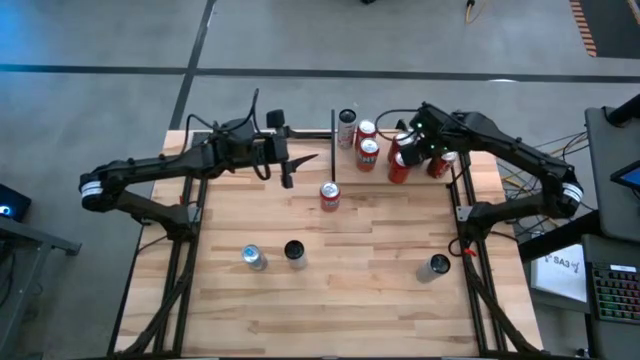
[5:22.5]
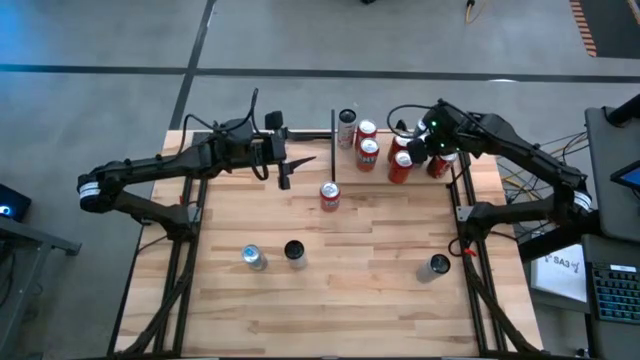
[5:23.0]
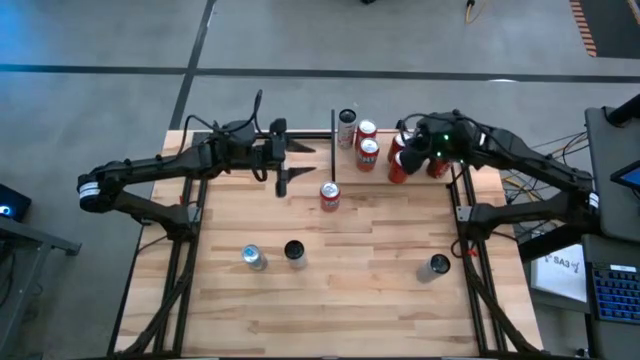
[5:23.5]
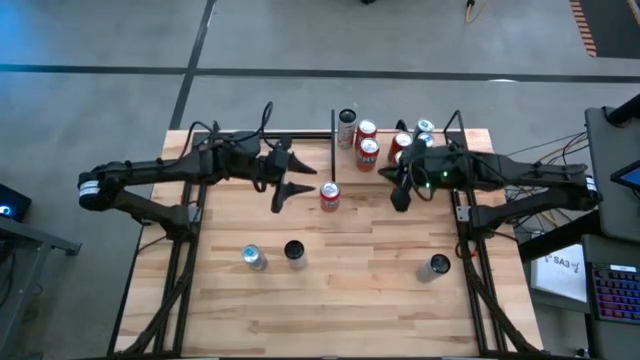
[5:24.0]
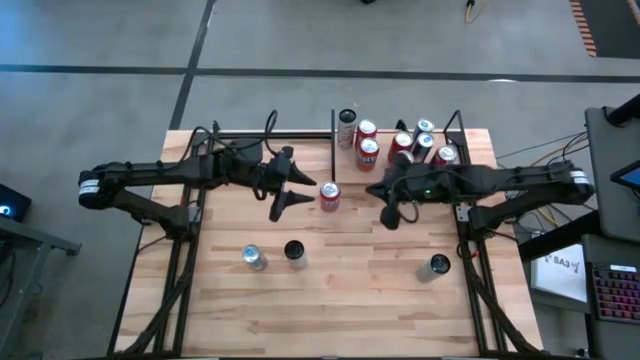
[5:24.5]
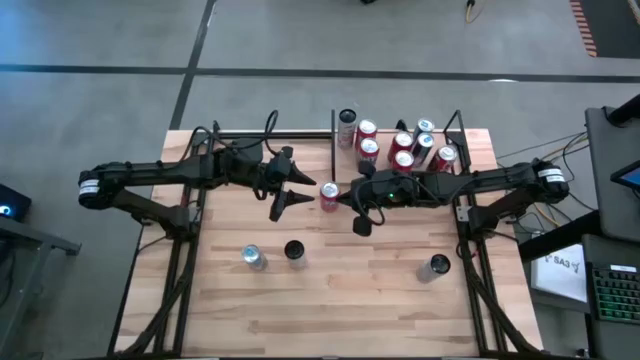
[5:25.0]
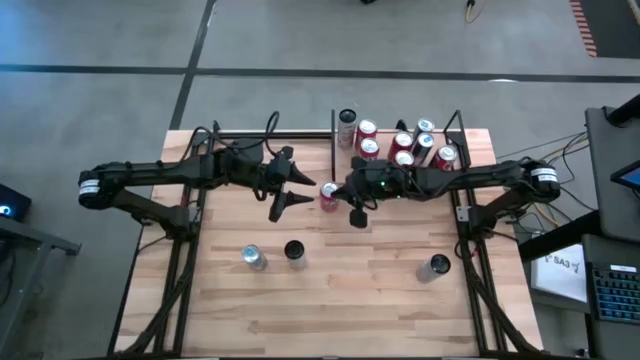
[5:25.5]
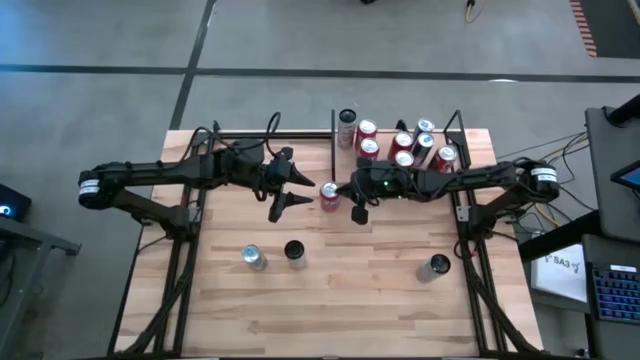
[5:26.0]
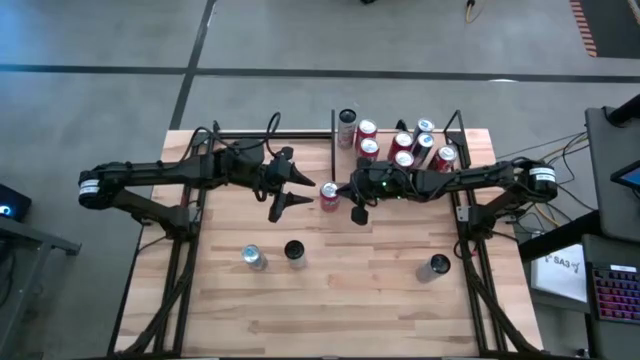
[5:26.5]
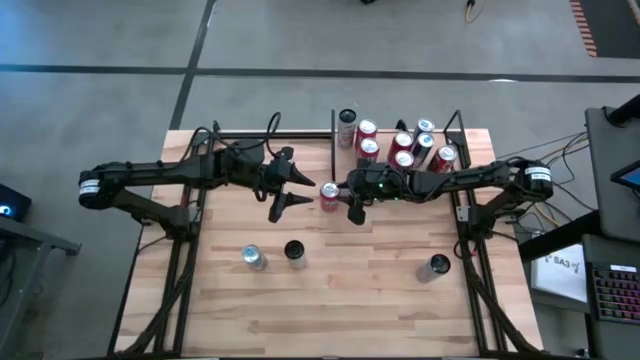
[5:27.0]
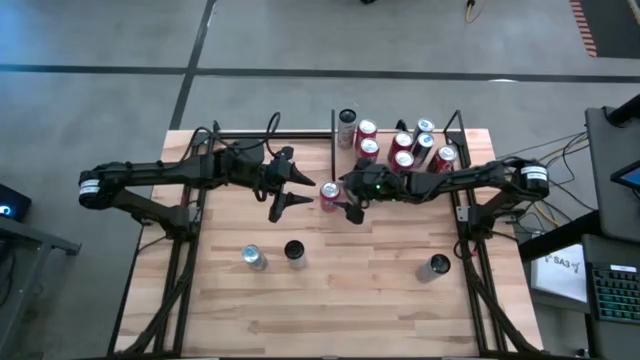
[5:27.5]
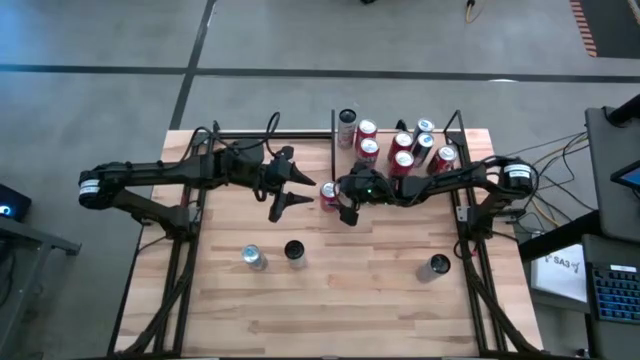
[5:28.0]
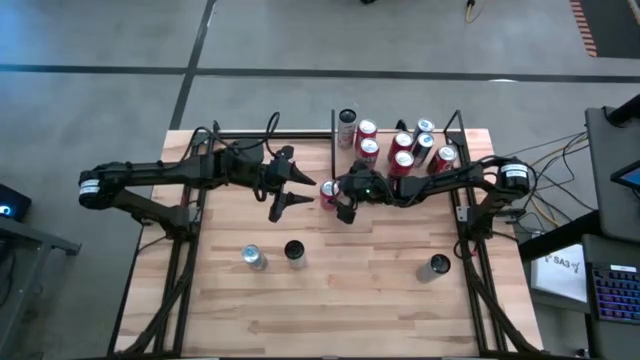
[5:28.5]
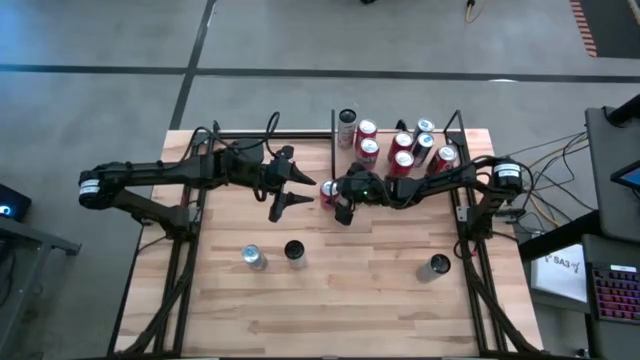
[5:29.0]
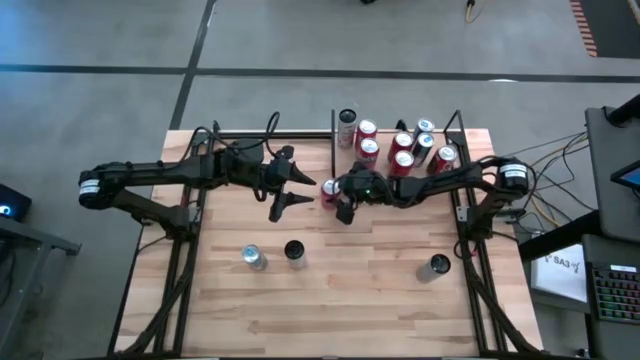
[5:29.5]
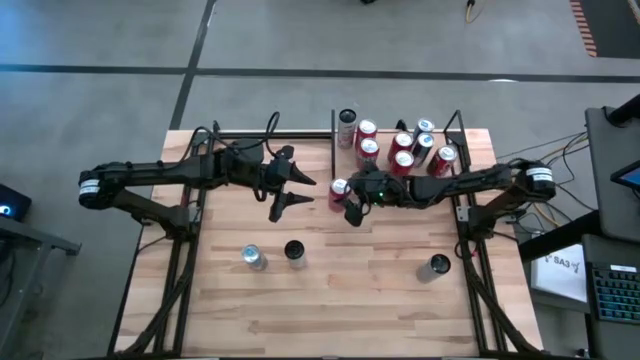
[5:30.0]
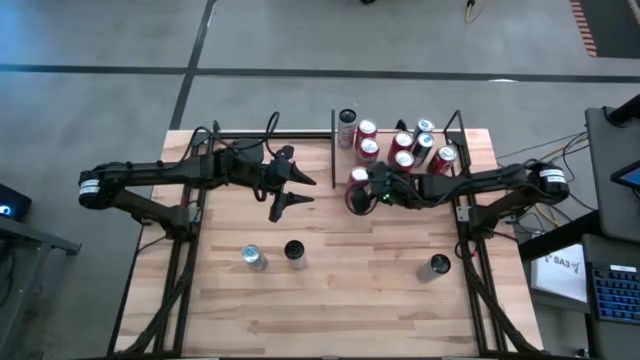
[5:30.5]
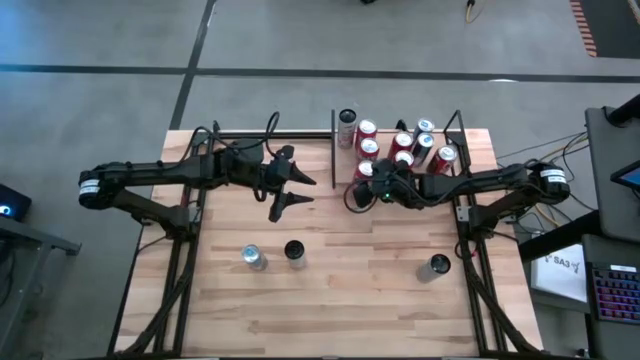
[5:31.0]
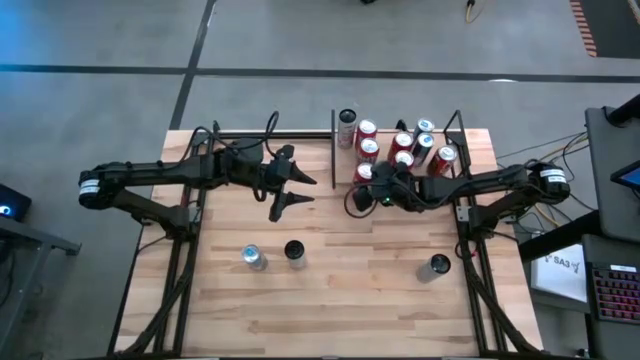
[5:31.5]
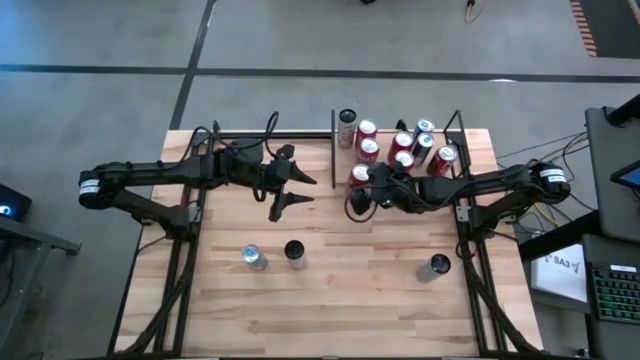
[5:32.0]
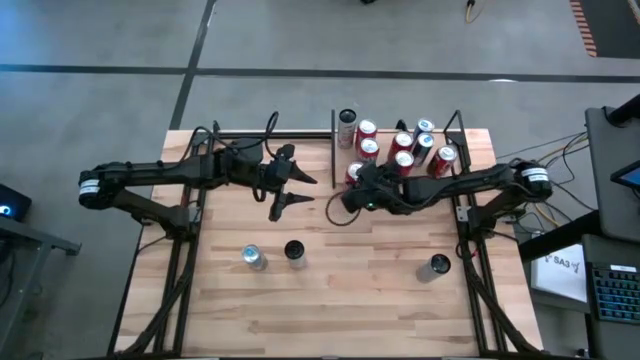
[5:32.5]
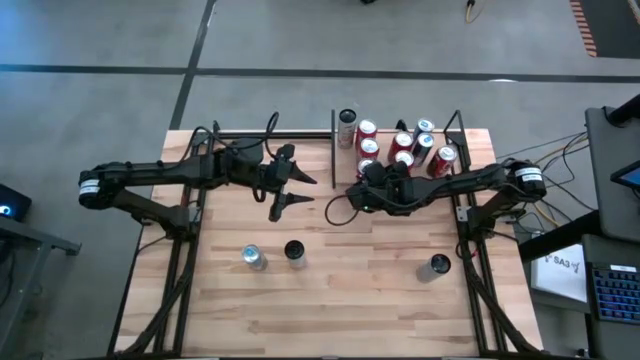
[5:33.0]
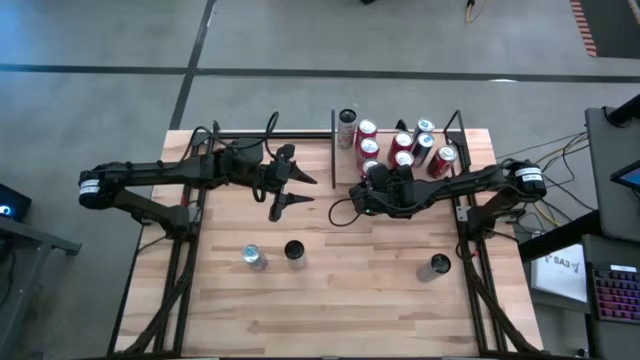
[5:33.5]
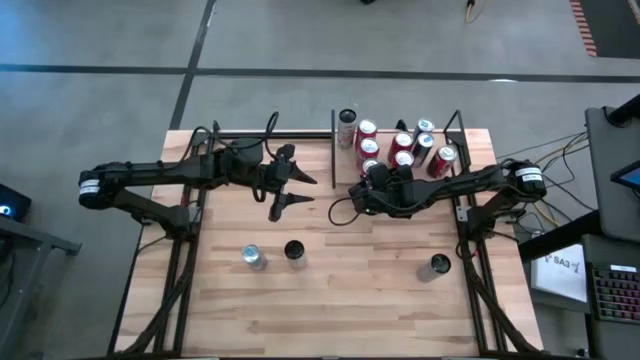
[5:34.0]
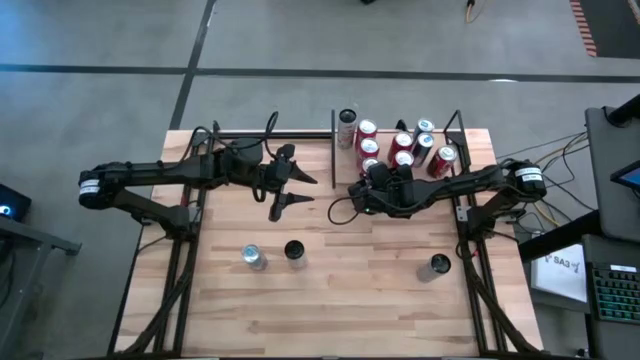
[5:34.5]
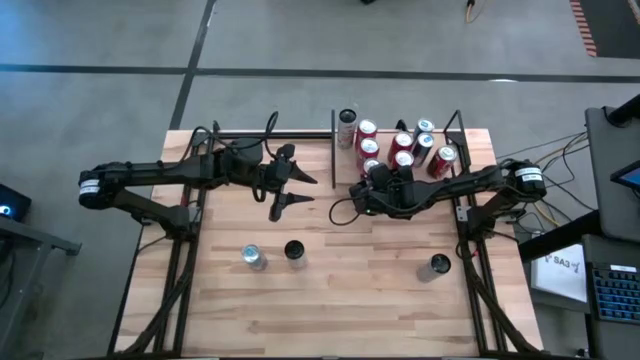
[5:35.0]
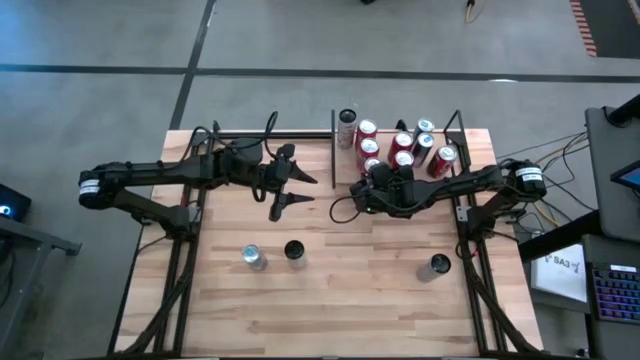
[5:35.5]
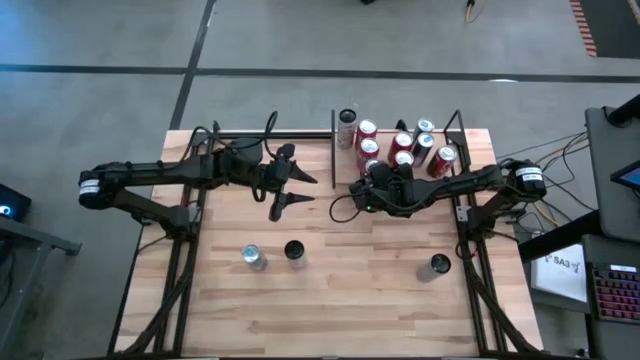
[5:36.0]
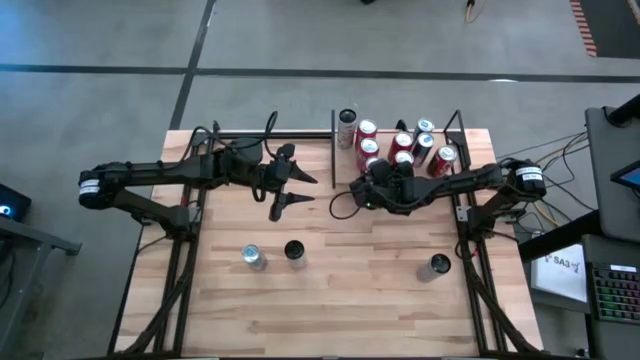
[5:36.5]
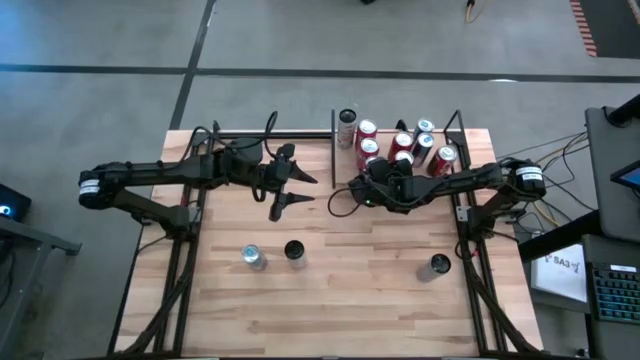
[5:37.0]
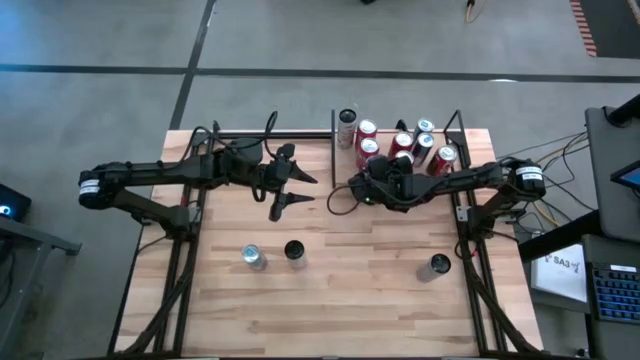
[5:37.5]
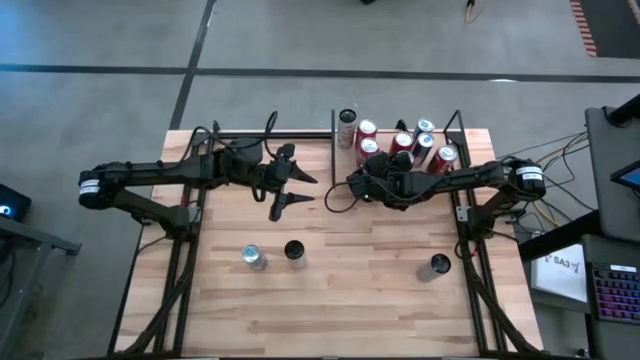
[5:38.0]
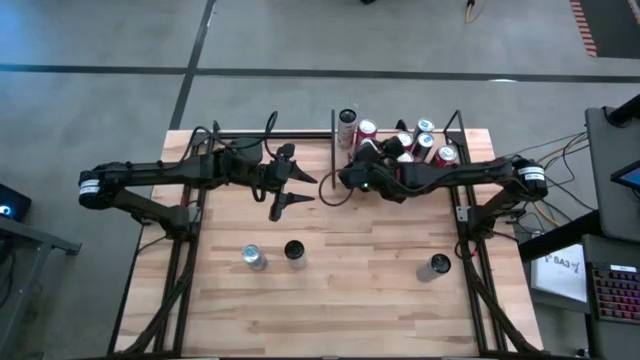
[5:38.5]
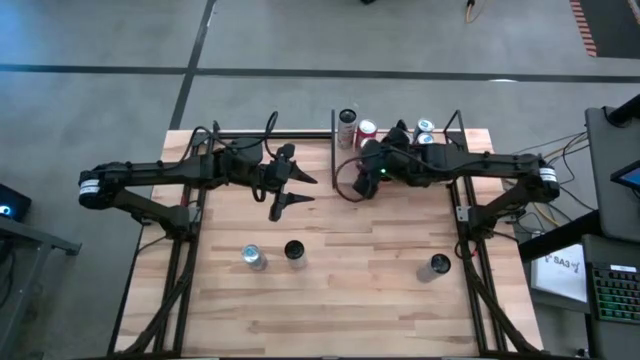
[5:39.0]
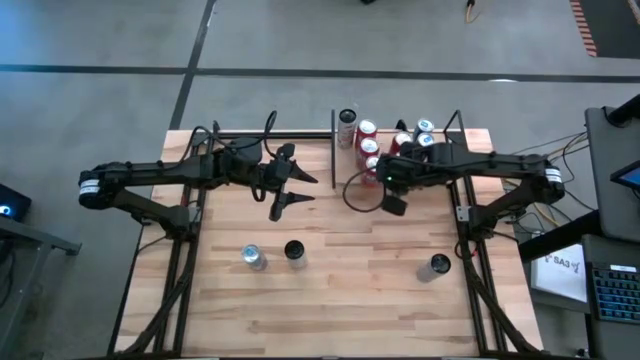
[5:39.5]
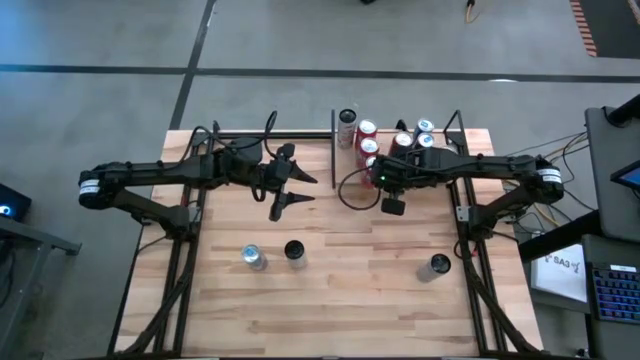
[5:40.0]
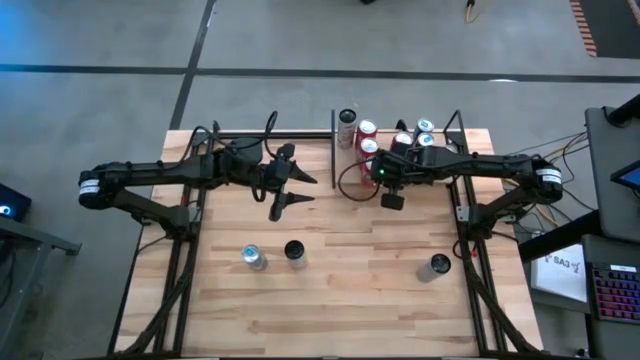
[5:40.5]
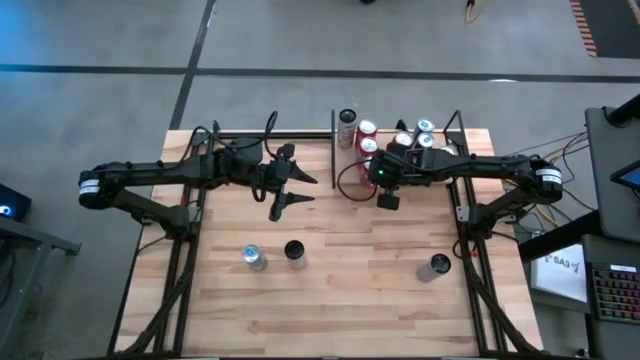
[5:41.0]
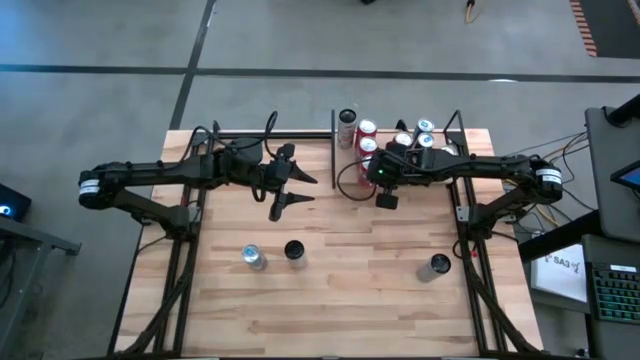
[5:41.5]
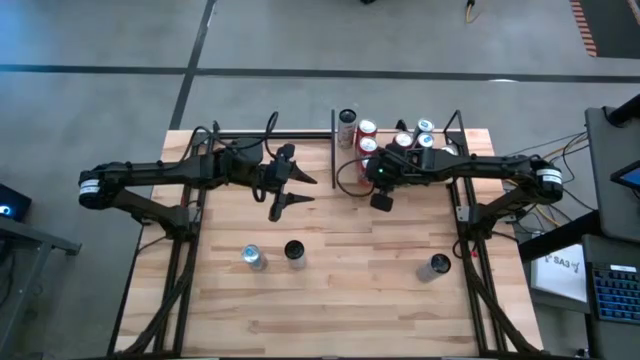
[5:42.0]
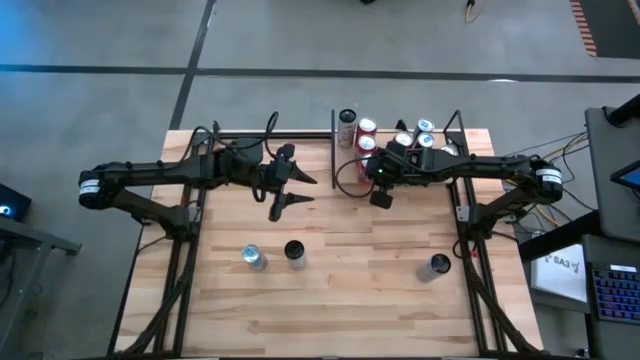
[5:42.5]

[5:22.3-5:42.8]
Task: Place canned beverage on shelf
Put the orange soda can on the shelf aligned with the other orange soda cans

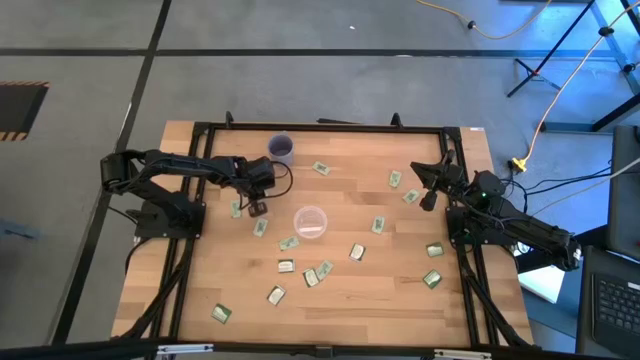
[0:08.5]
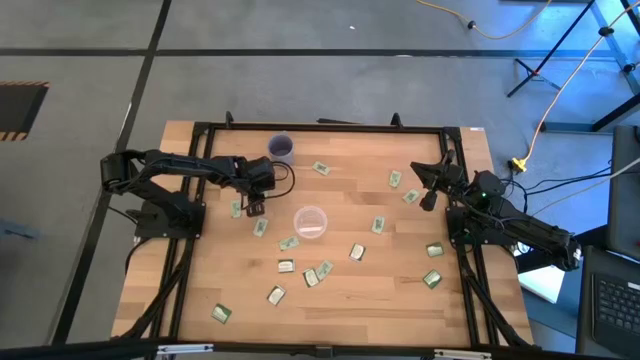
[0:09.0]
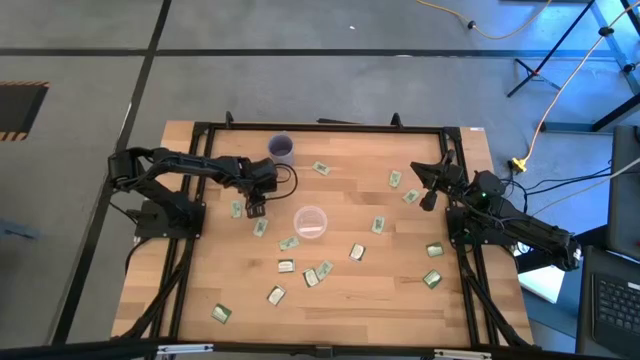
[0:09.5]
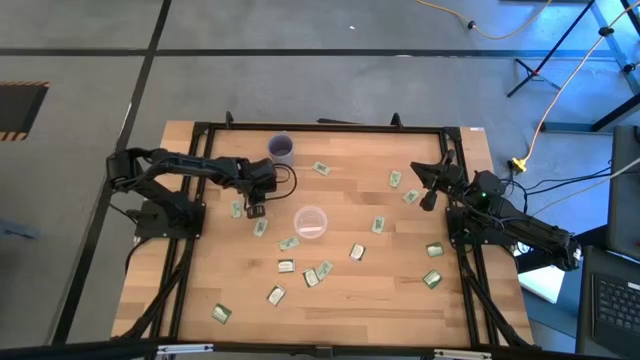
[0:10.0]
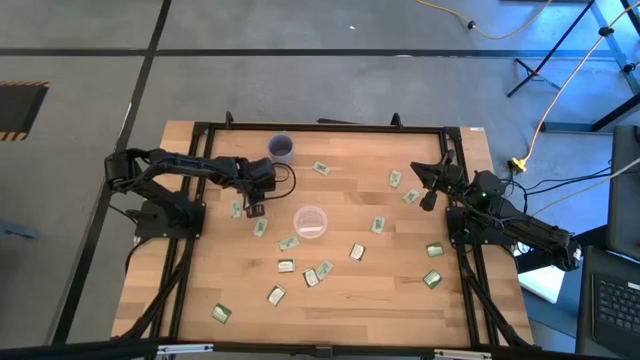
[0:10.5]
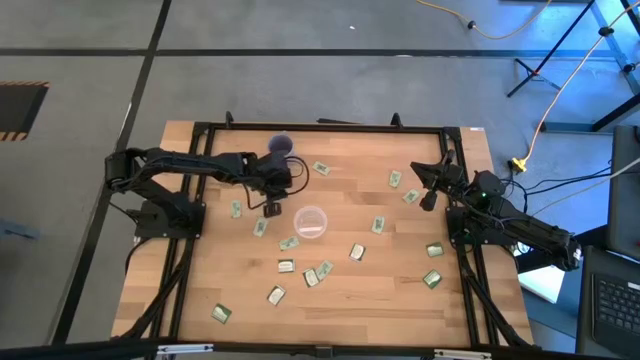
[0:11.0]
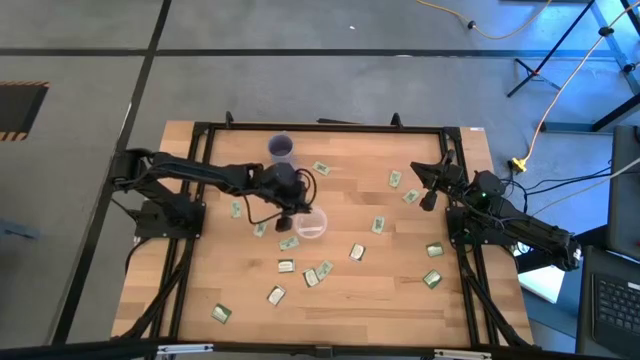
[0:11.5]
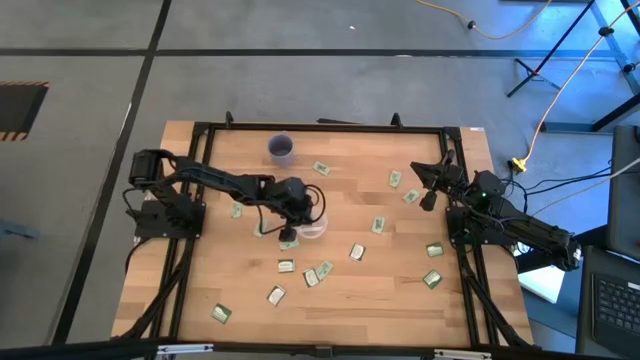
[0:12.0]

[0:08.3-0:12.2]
Task: Pick and place Stevia / Truvia into bins
Put the stevia packet into the transparent container
